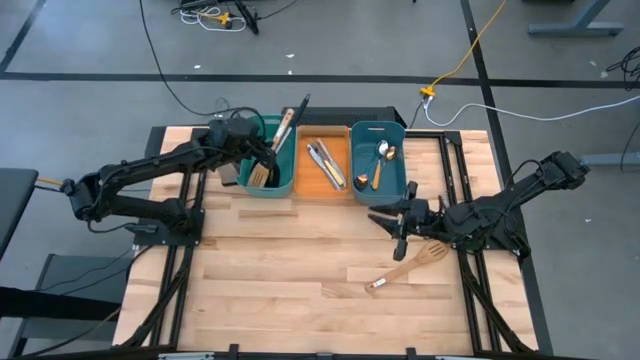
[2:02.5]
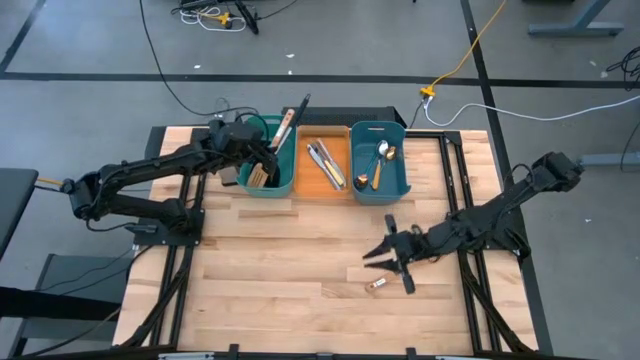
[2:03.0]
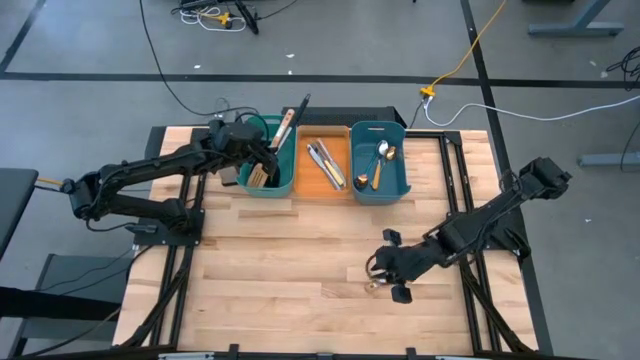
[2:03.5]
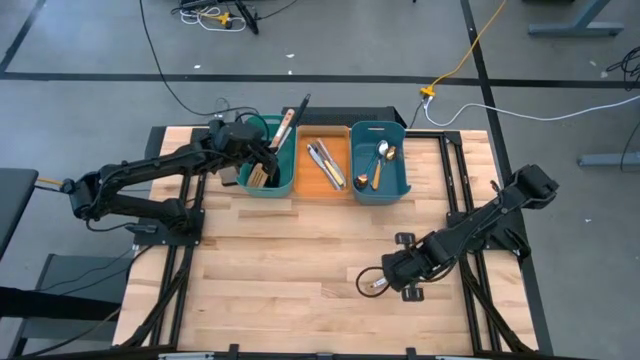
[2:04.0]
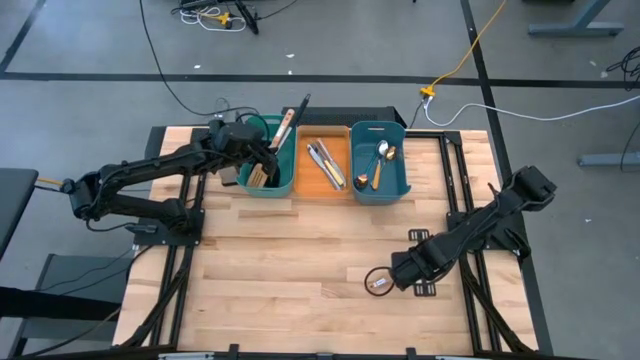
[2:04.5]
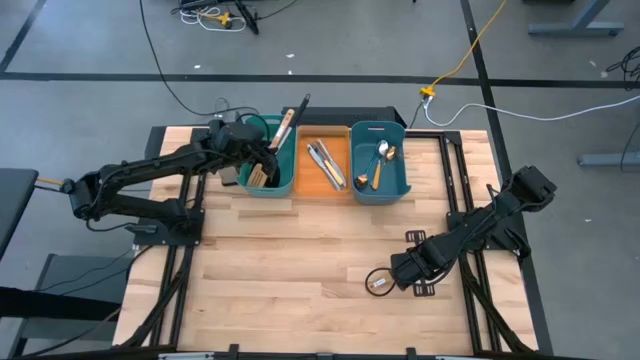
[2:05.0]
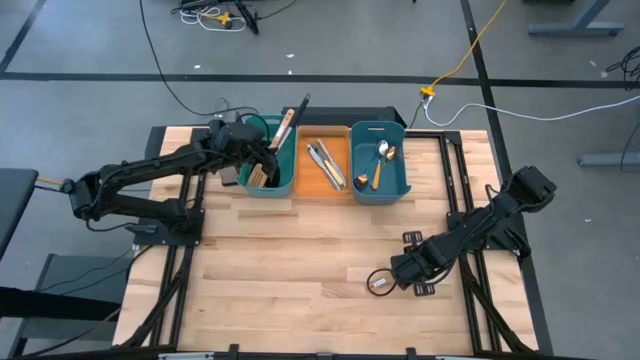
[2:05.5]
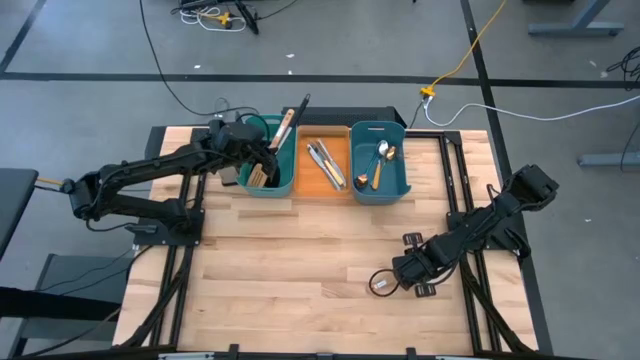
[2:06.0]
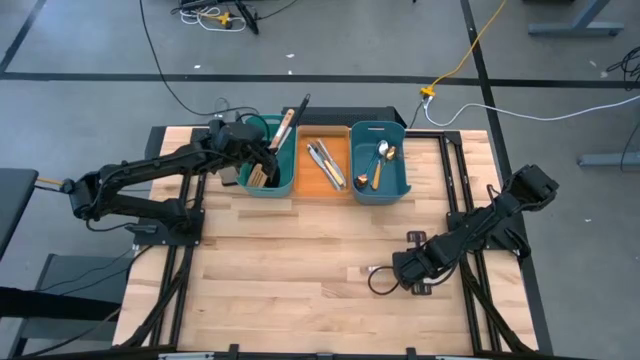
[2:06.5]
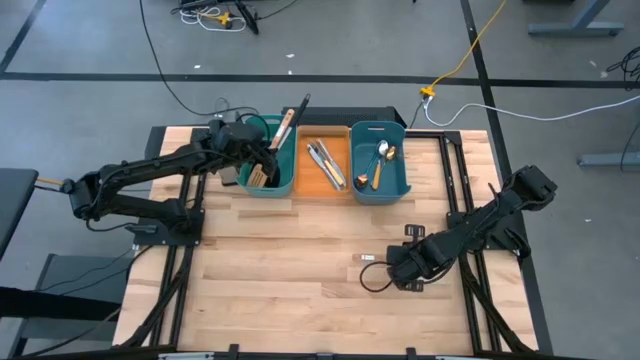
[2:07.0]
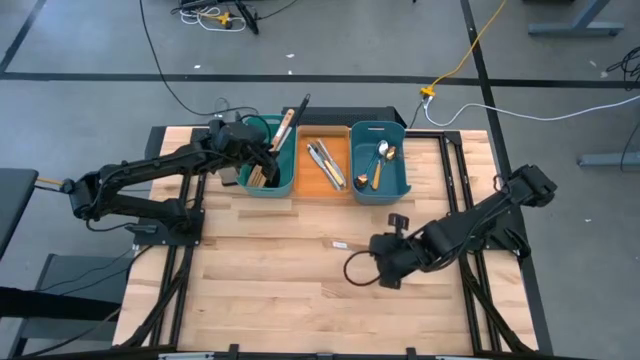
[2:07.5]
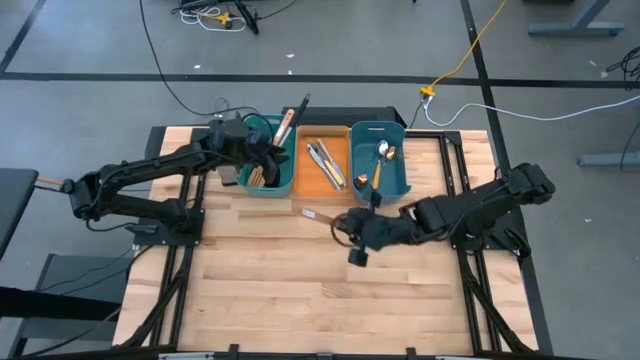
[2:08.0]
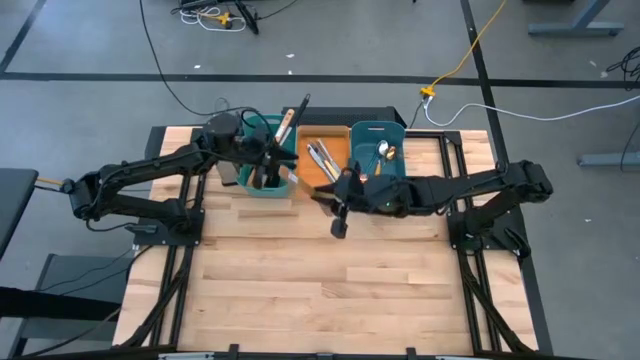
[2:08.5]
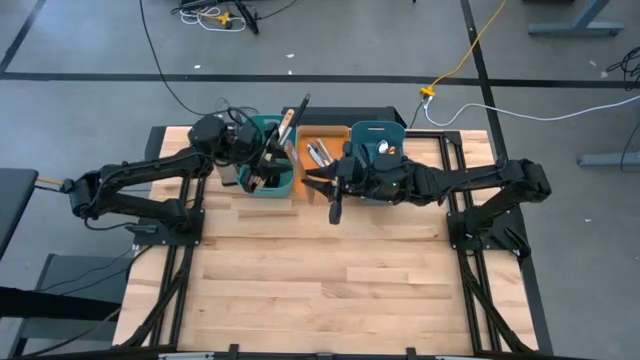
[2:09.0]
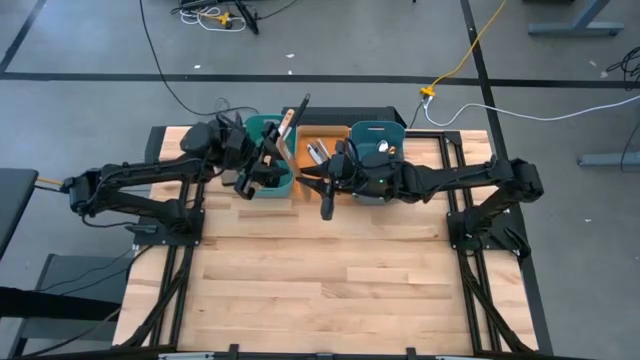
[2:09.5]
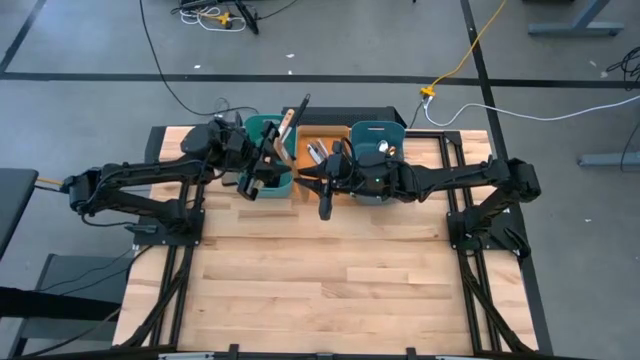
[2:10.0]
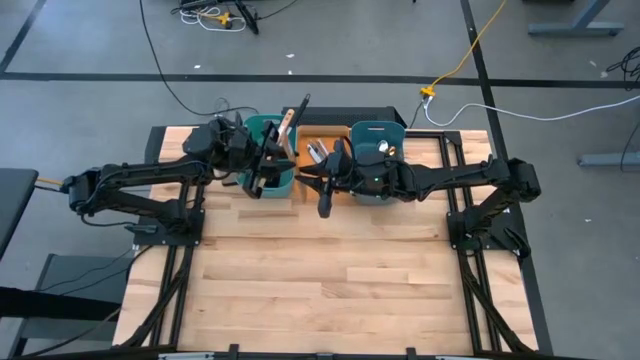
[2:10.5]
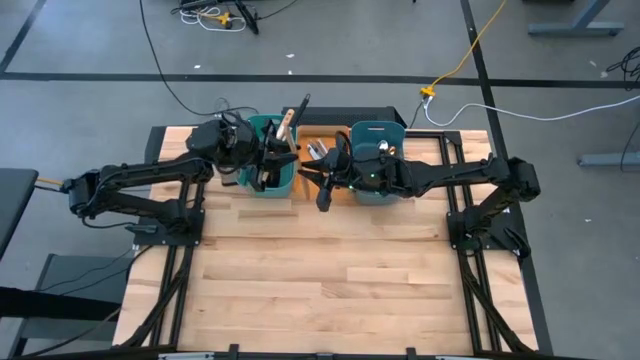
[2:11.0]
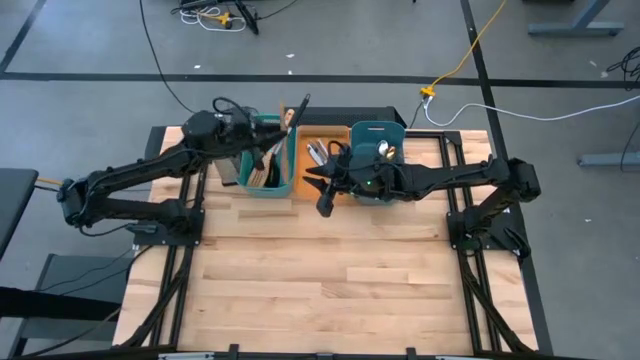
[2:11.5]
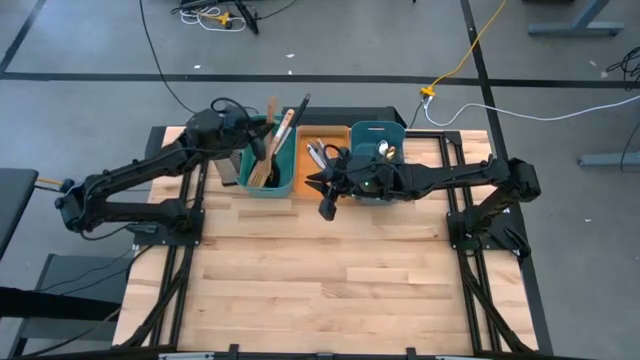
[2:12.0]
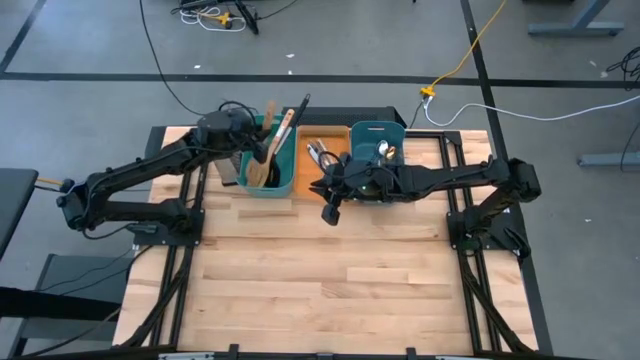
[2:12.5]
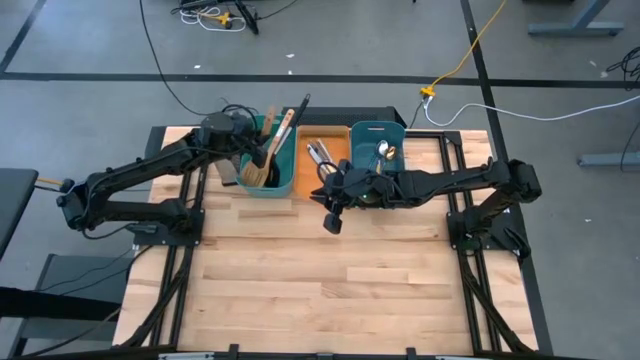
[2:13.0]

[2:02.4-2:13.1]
Task: Pick & Place Kitchen Items
Put the wooden spatula into the green bin

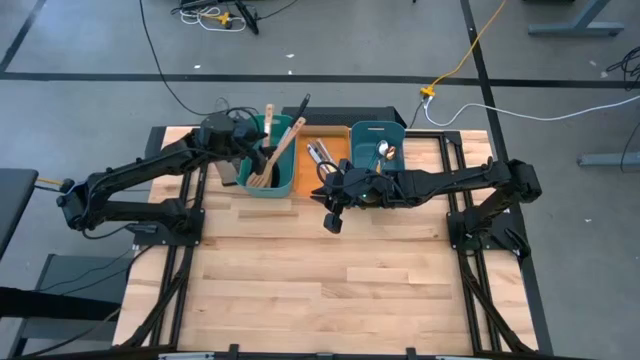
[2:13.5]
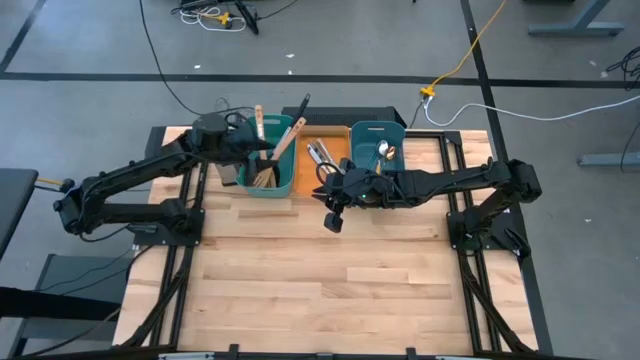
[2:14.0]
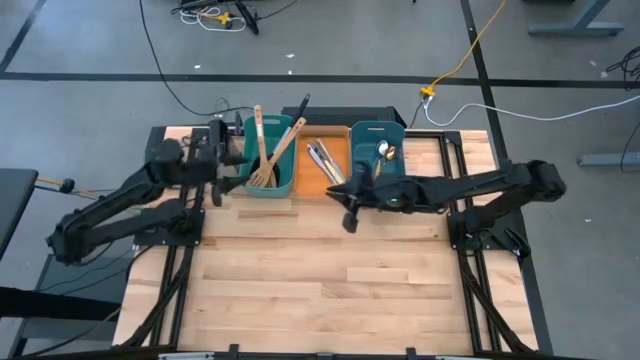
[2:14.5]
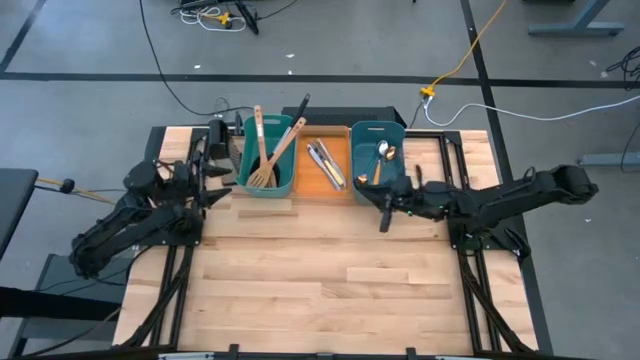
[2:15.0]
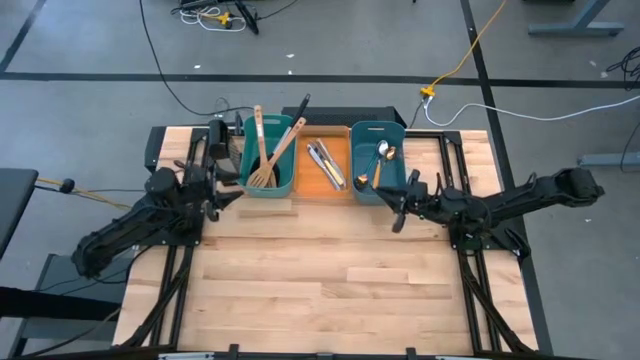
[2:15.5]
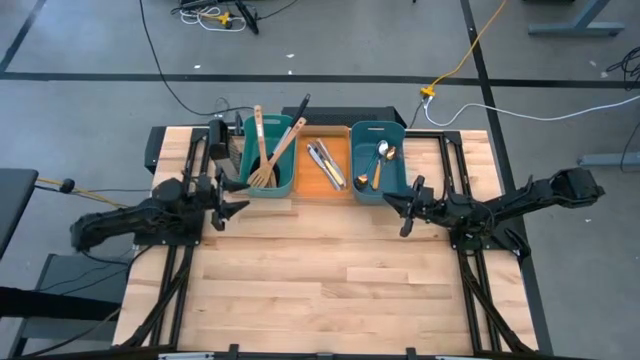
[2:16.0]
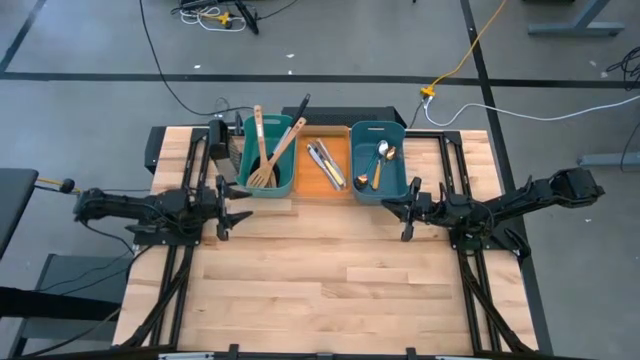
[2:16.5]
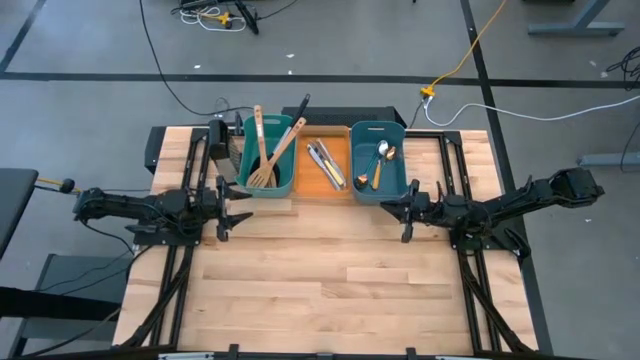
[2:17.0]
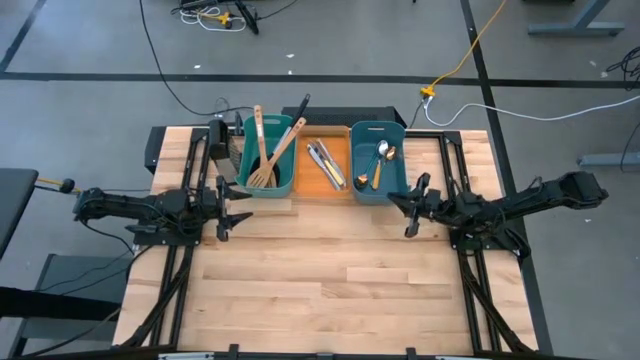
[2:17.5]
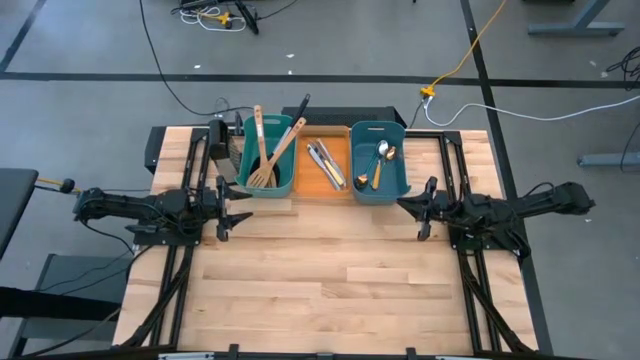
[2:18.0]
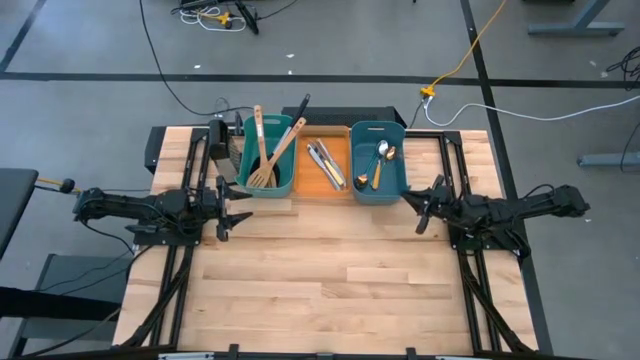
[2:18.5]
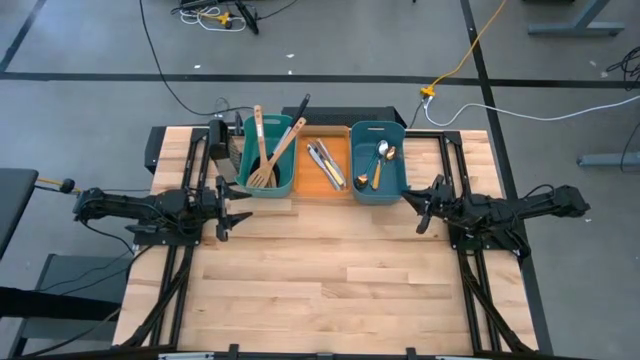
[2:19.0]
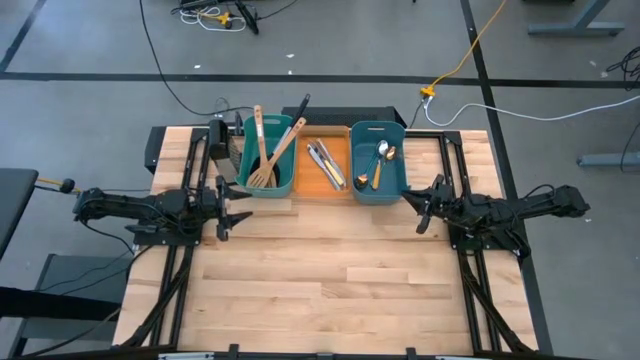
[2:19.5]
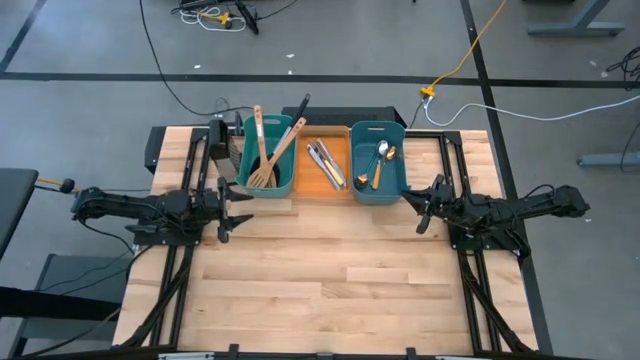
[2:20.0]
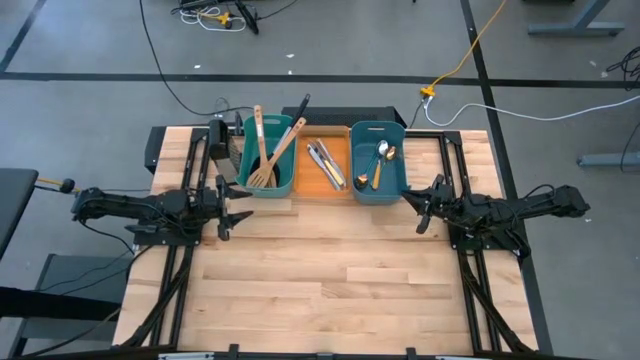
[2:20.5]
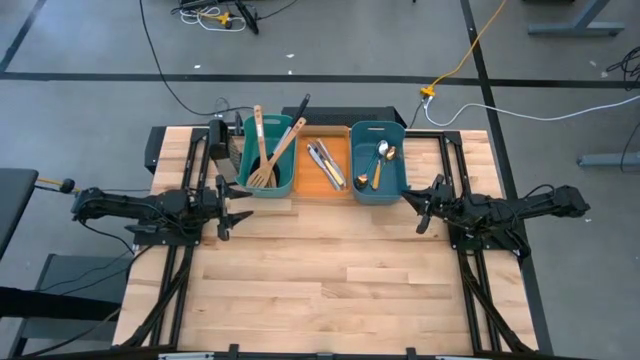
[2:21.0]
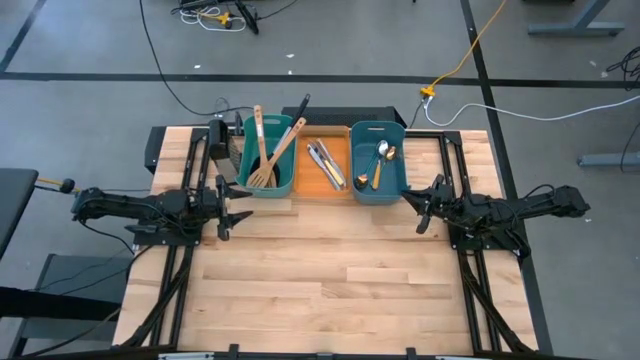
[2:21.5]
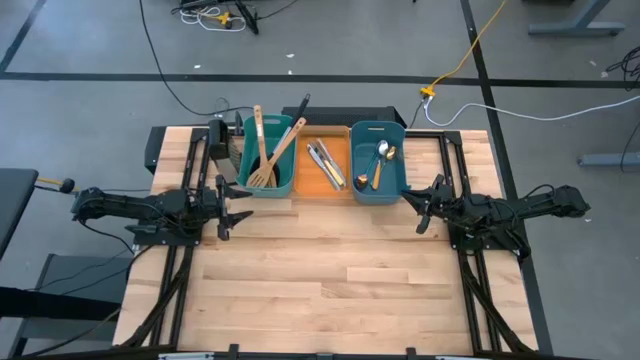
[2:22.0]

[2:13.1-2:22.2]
Return to Home Position

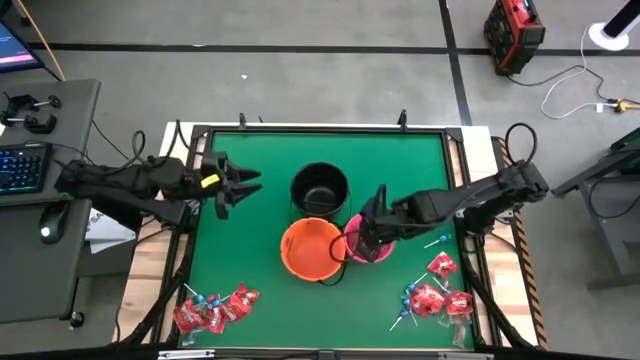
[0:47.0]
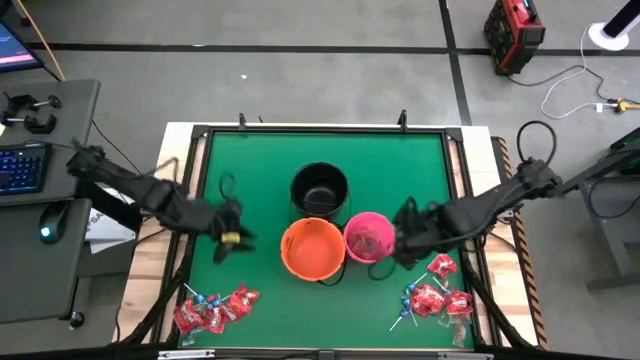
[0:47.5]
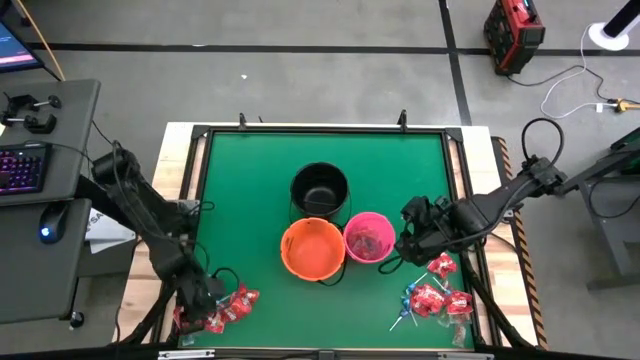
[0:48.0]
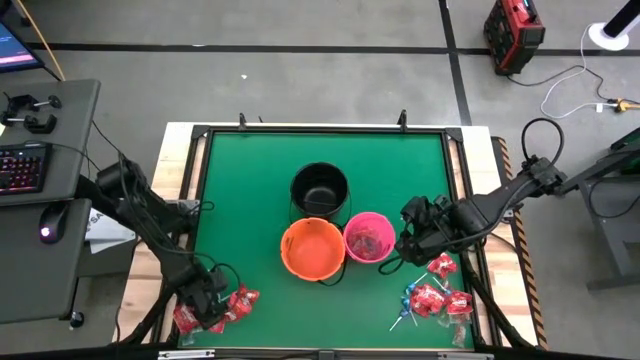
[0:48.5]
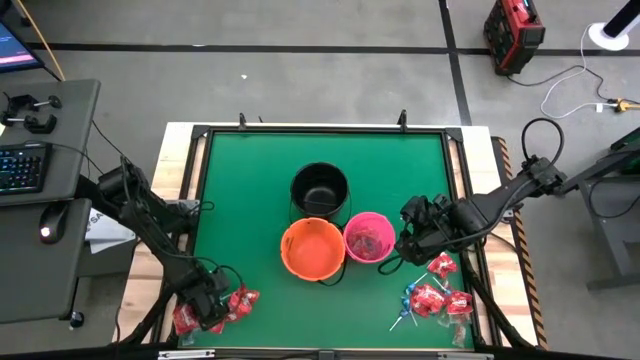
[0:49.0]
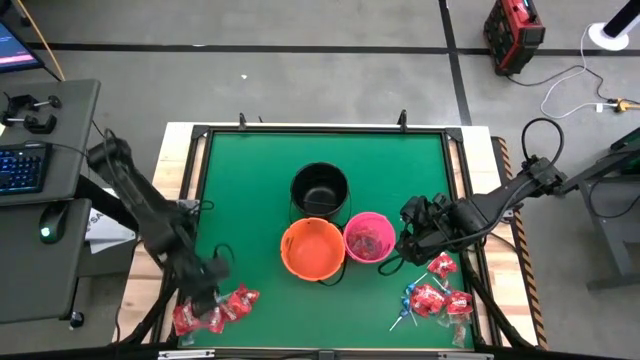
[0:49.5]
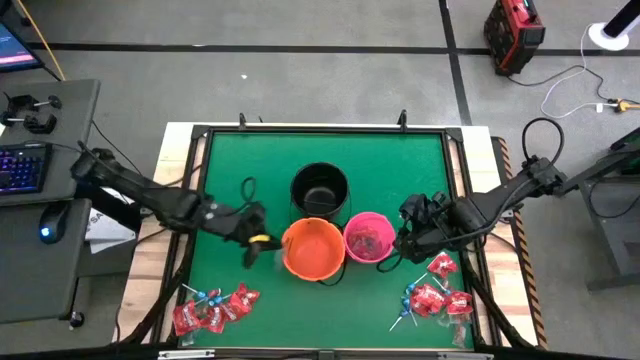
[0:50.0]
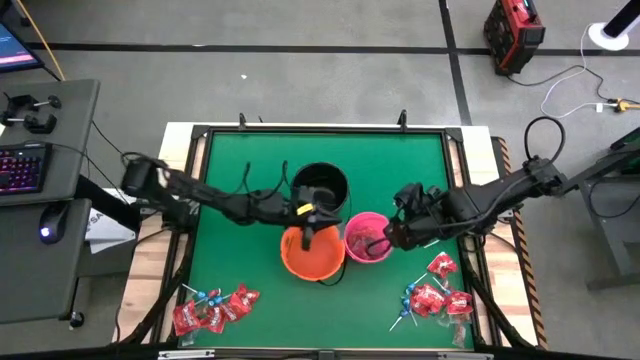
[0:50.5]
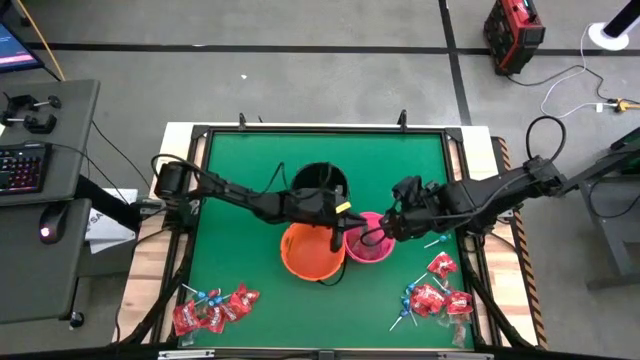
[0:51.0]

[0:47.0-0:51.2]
Task: Sort candy by brand, put in halloween buckets
Put the blue gummy into the pink bucket
